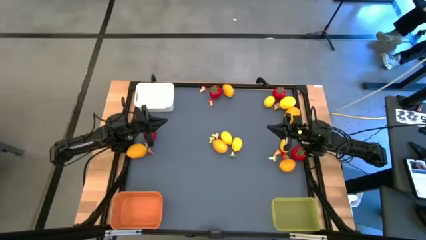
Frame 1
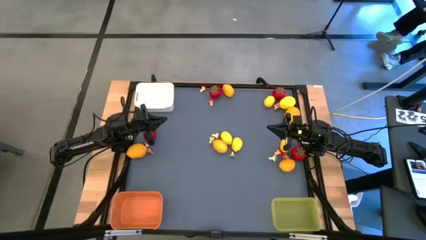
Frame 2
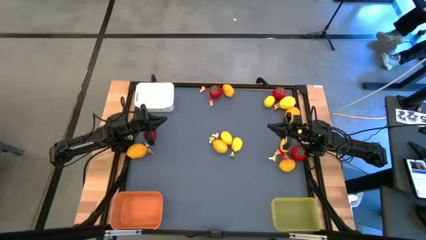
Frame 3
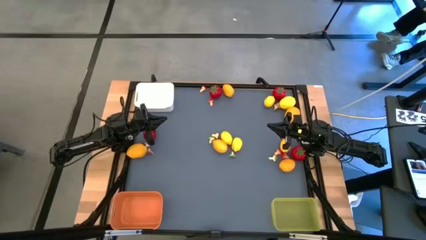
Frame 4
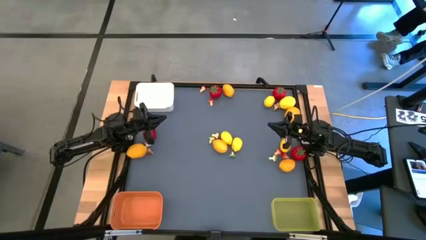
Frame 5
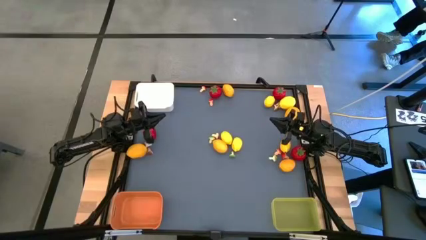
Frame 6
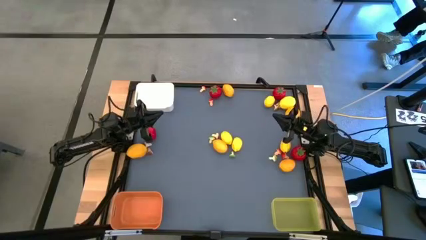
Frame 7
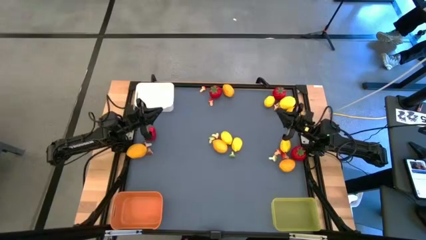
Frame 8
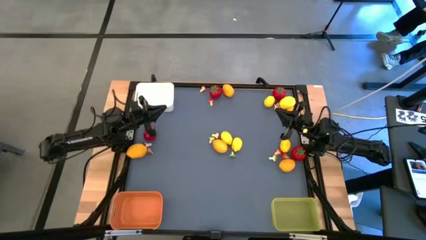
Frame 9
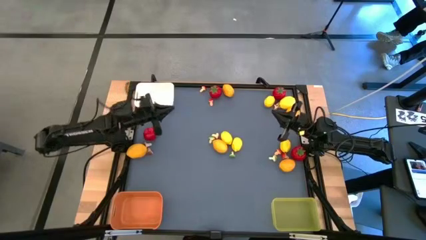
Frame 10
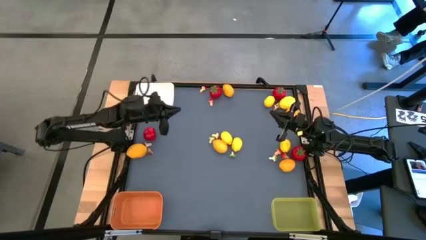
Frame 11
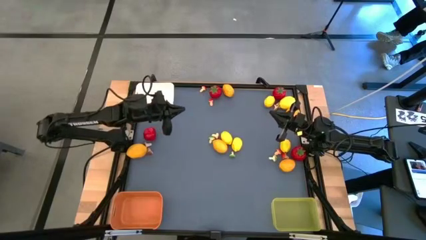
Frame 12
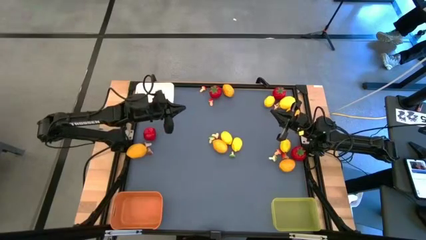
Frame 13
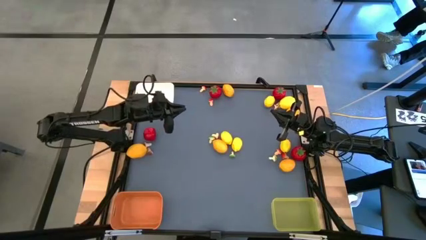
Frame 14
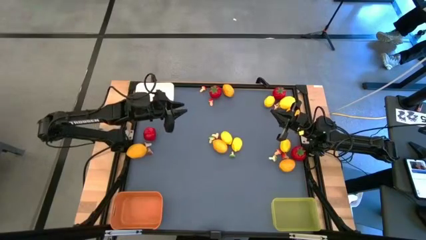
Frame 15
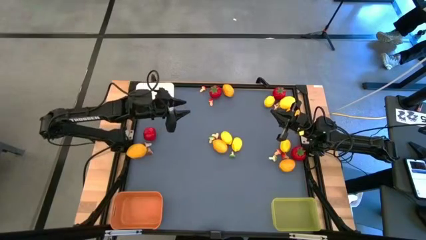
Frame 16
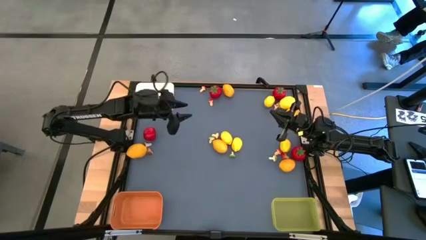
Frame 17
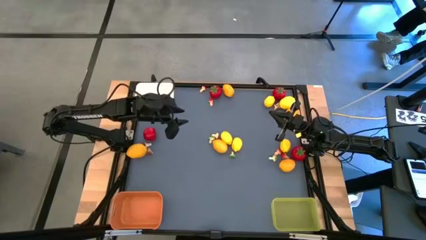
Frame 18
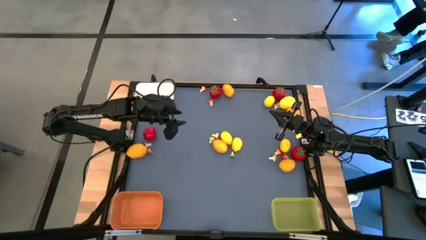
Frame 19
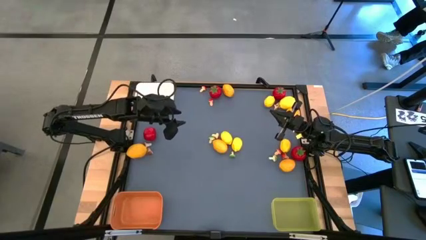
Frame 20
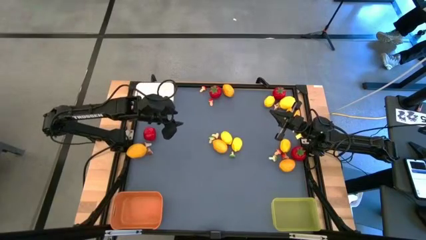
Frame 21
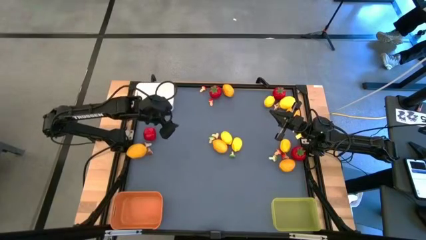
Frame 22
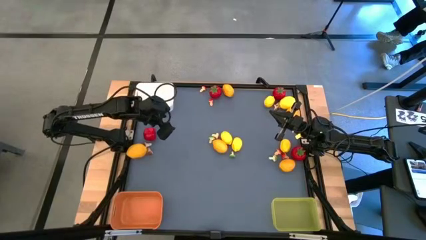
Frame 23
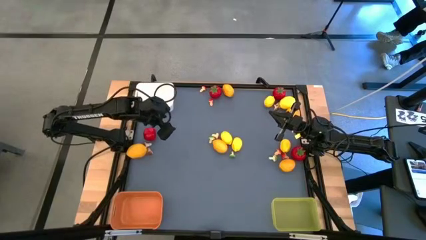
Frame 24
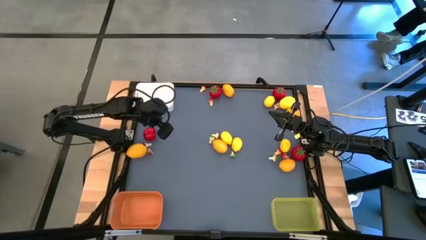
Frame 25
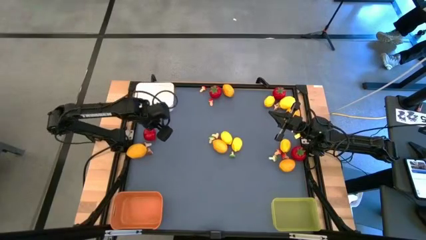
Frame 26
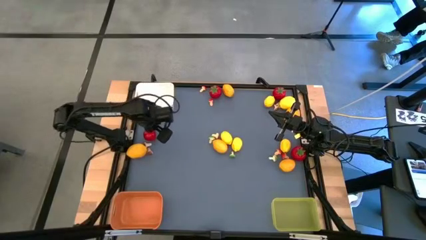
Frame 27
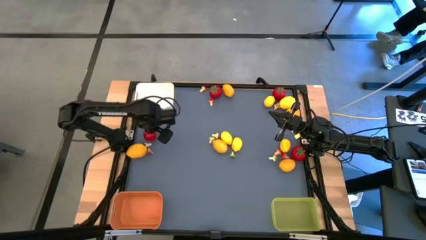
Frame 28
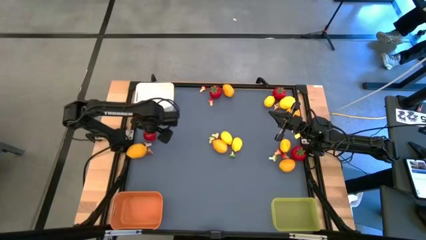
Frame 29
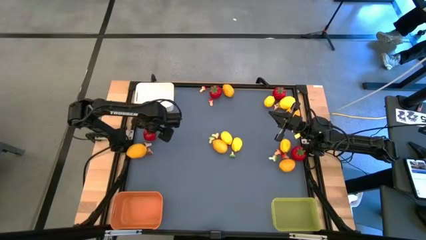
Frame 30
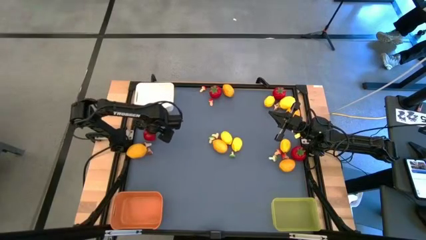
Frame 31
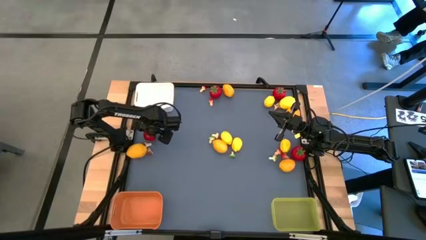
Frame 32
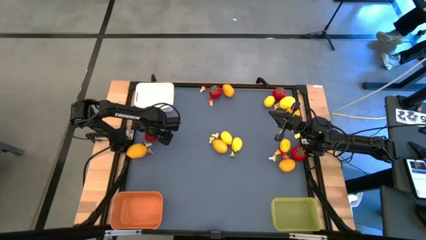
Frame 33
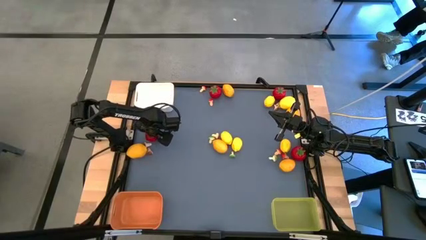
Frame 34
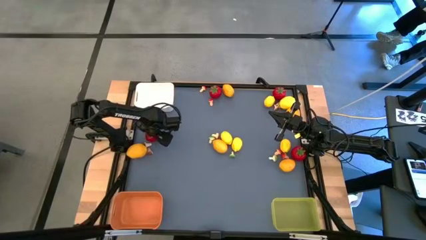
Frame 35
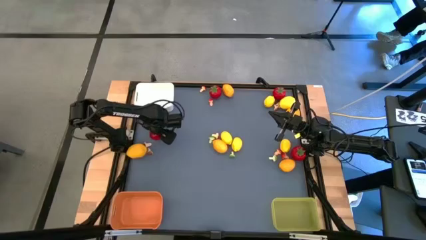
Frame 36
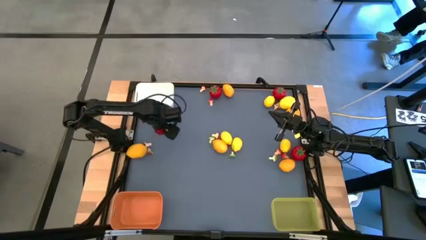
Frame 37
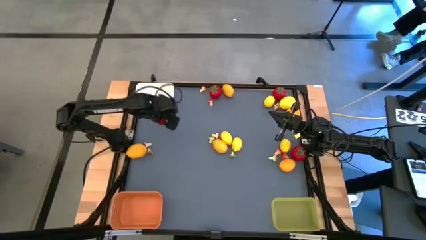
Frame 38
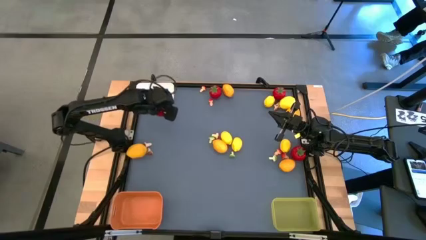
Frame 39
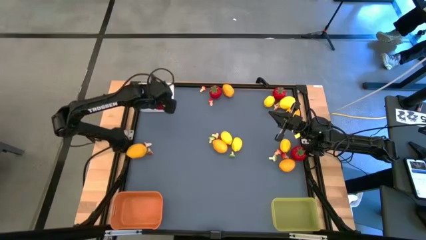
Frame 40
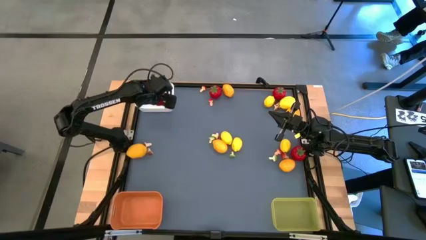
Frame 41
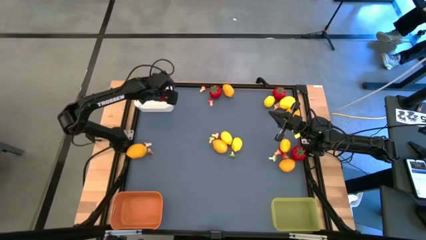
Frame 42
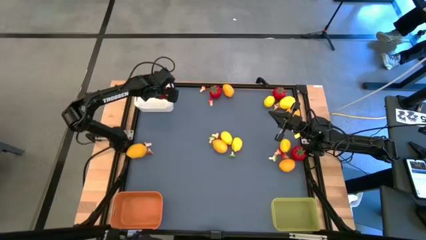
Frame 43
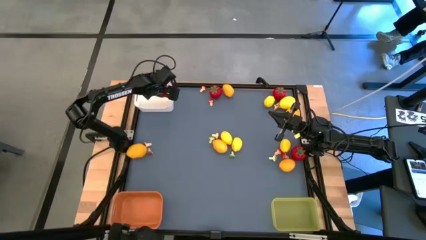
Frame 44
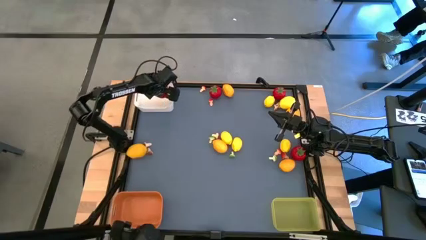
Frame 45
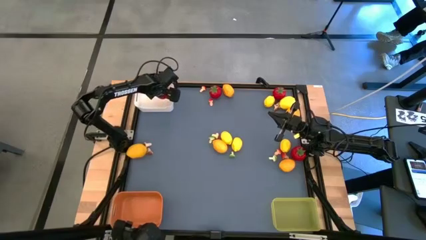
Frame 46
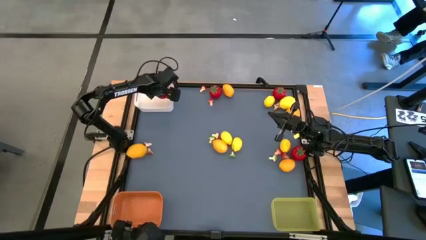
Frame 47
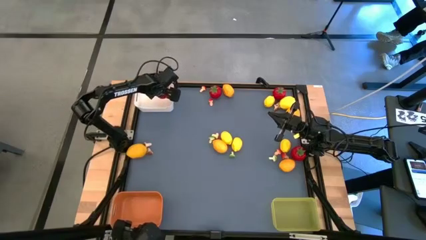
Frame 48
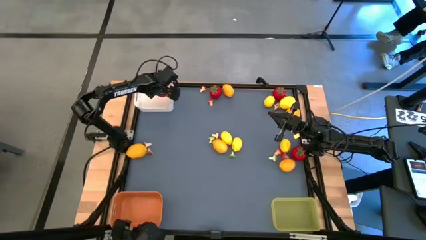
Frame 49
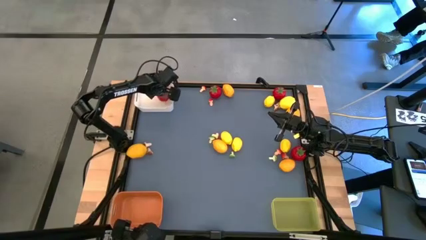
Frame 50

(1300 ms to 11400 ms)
Task: Sort produce into baskets
Put the red tomato into the white bin

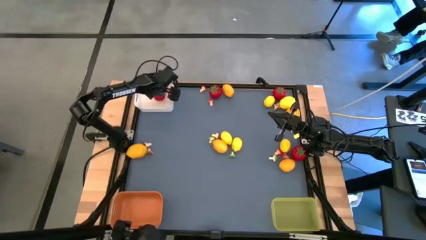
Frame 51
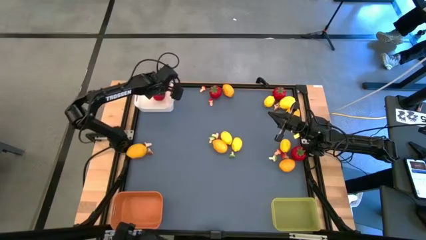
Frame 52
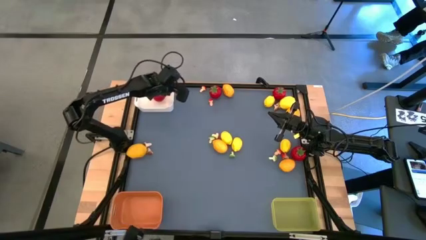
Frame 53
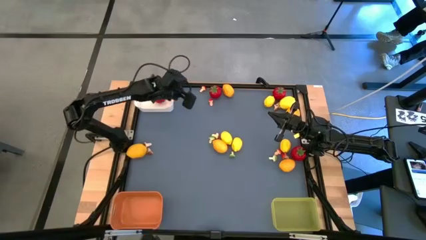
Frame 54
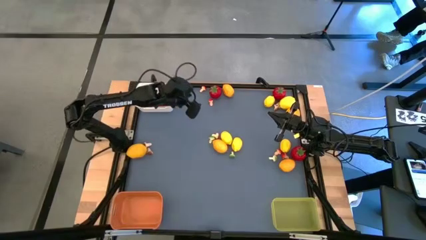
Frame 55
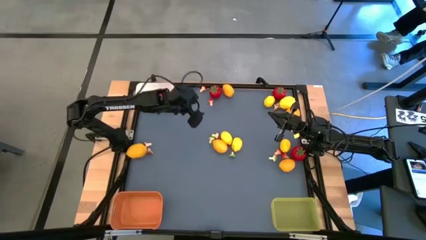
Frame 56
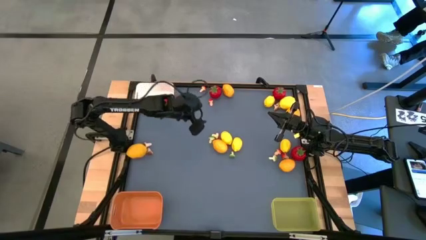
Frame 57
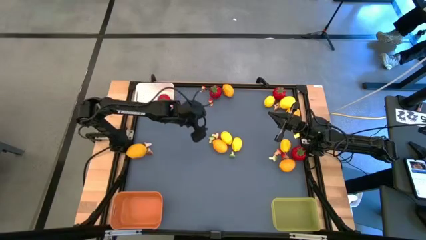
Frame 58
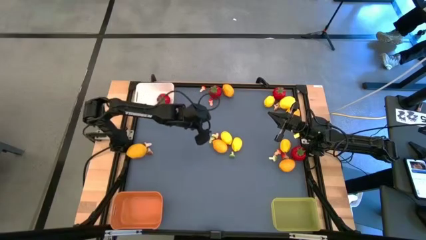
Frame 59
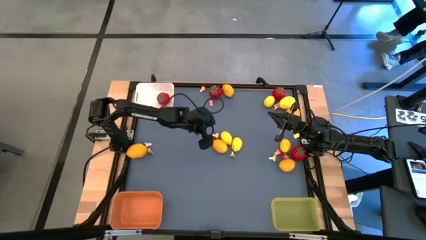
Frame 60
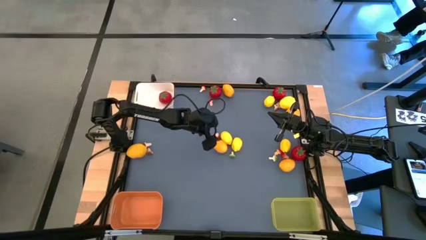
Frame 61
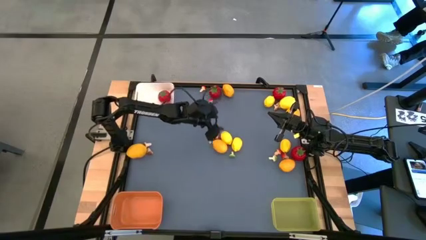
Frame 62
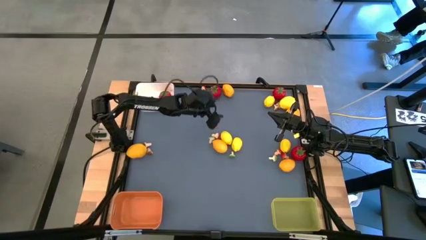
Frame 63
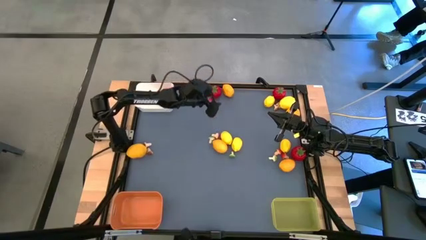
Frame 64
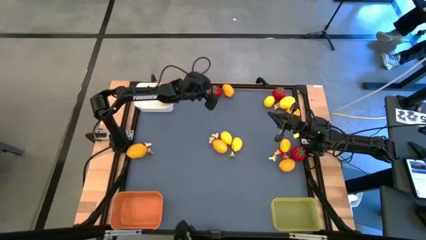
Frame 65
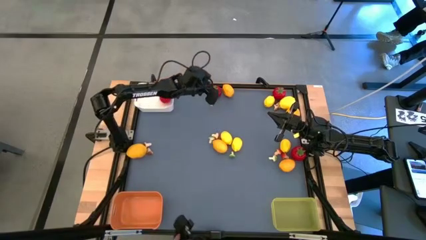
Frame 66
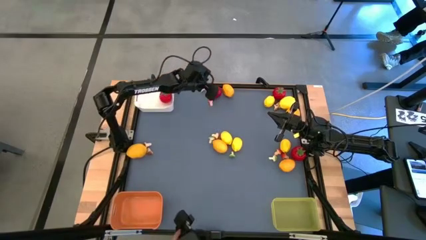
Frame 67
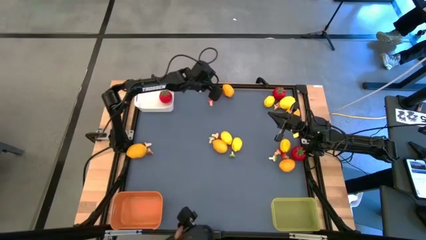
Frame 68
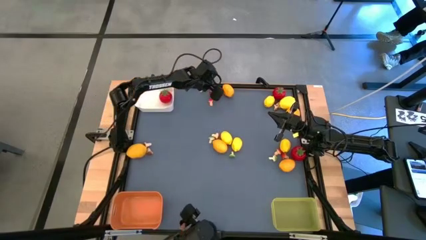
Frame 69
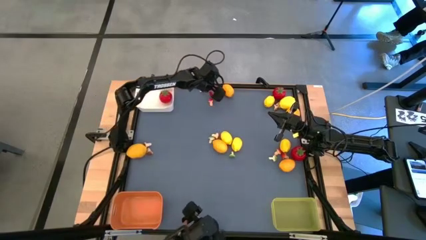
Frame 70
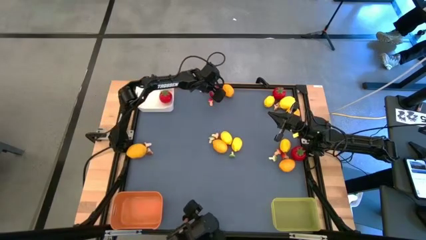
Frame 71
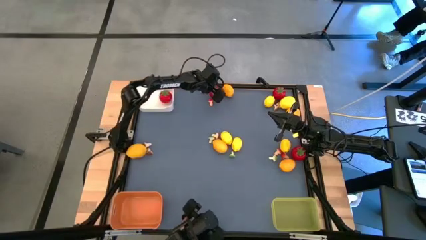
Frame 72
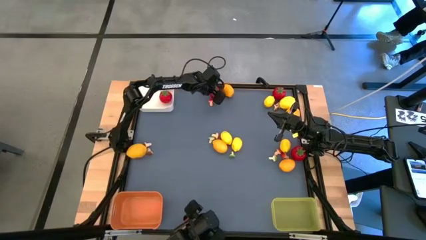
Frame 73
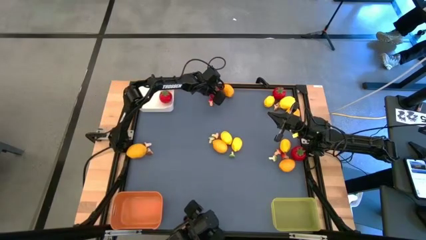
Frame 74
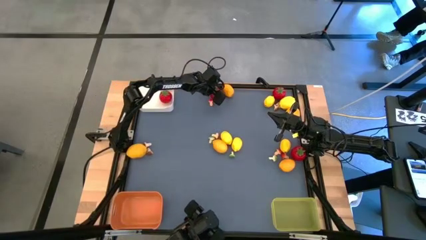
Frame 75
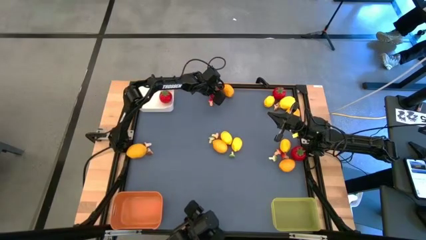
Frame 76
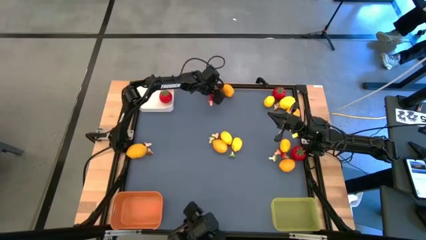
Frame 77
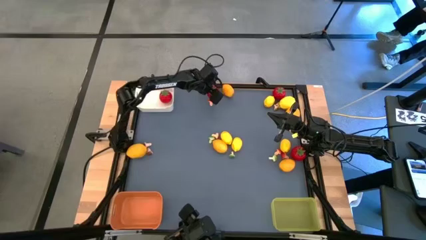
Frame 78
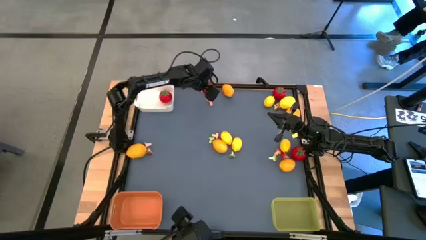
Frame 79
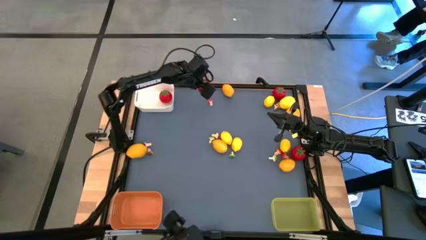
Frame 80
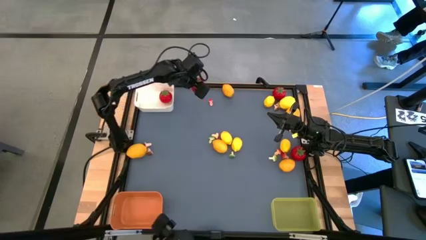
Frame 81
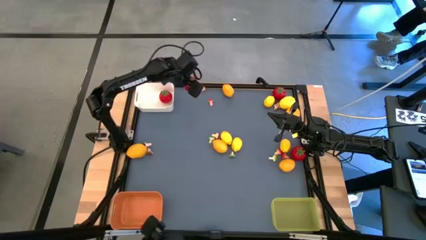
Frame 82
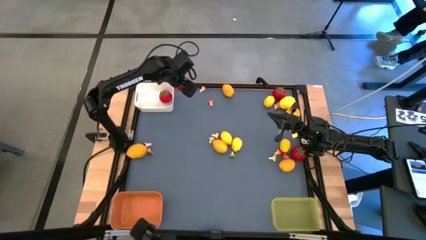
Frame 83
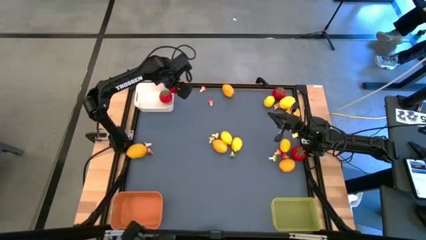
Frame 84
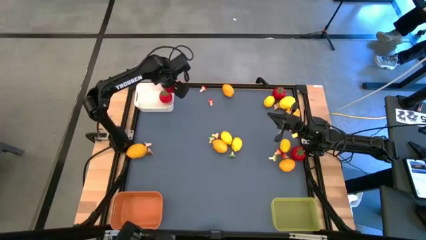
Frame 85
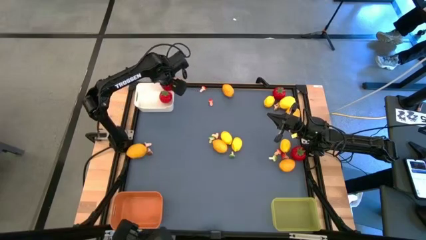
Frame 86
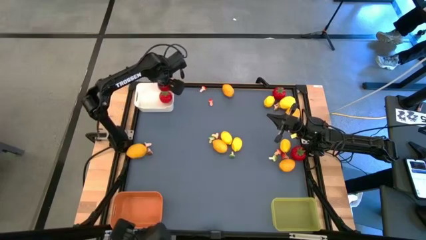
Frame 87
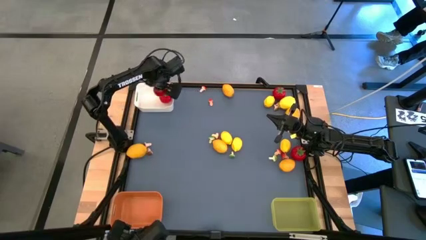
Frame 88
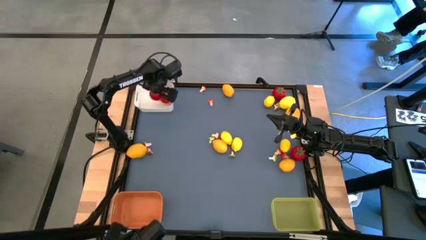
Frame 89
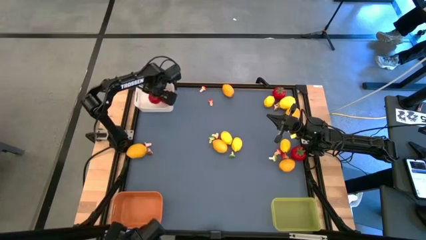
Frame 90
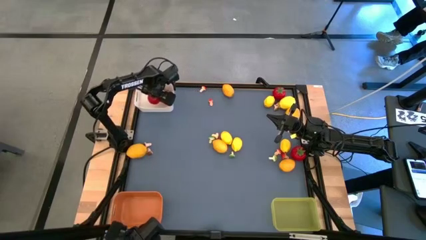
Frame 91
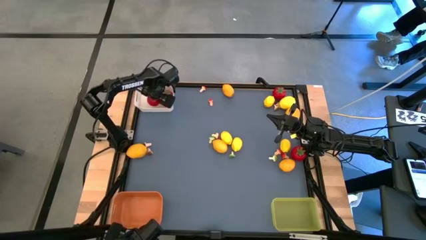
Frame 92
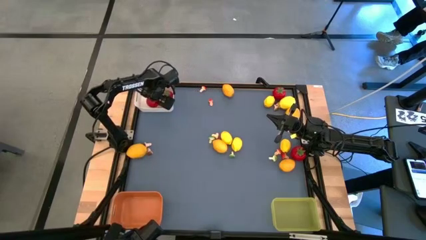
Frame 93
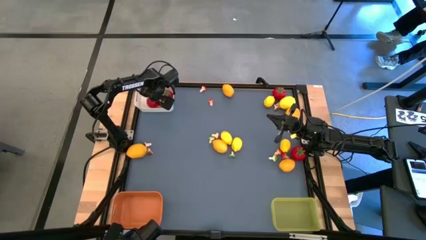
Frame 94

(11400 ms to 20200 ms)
Put the red tomato into the white bin
